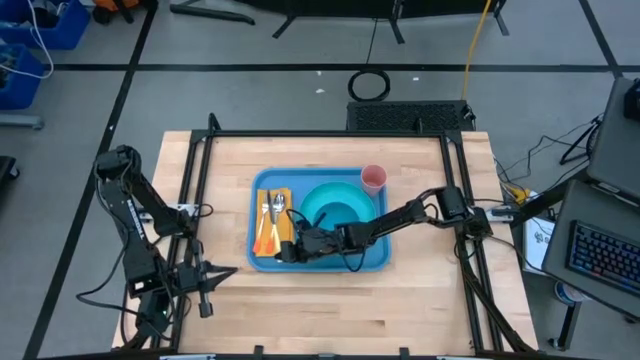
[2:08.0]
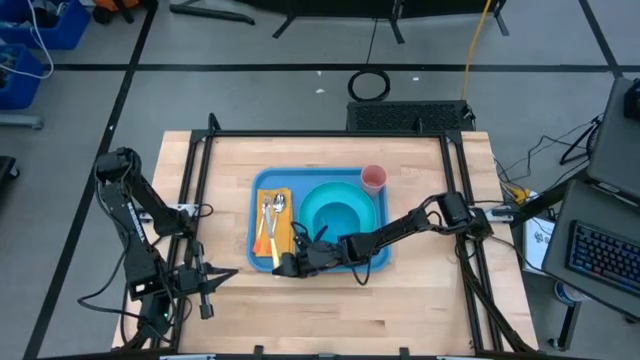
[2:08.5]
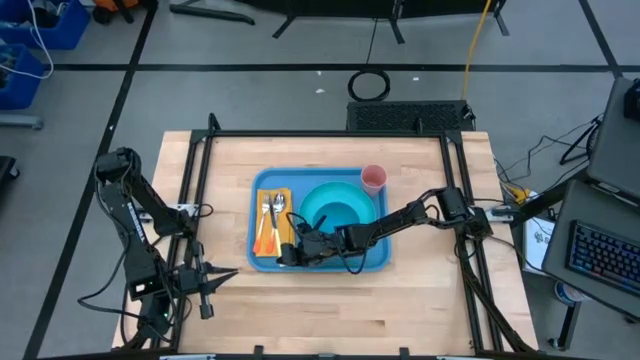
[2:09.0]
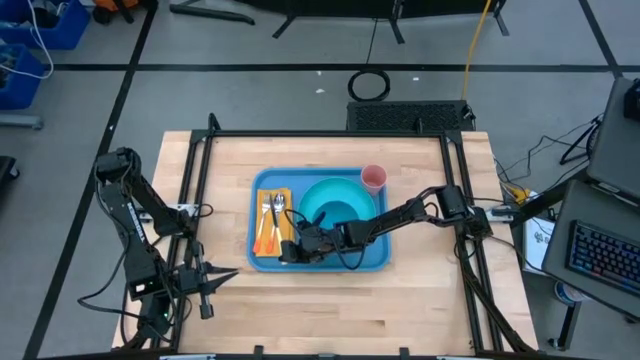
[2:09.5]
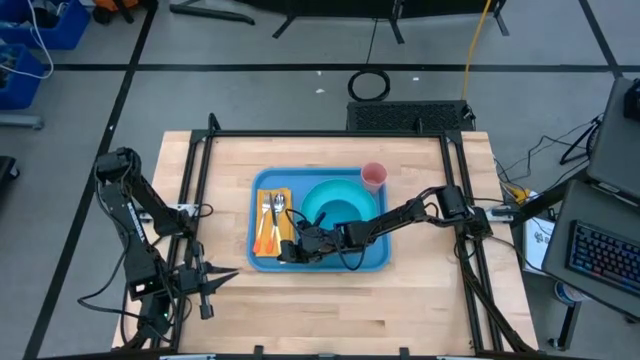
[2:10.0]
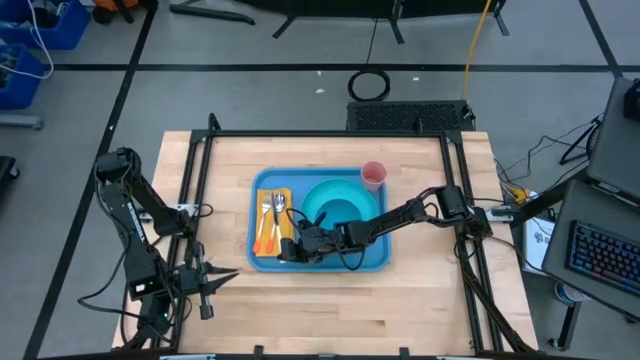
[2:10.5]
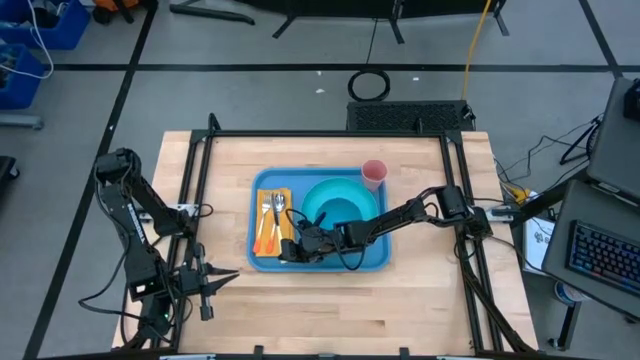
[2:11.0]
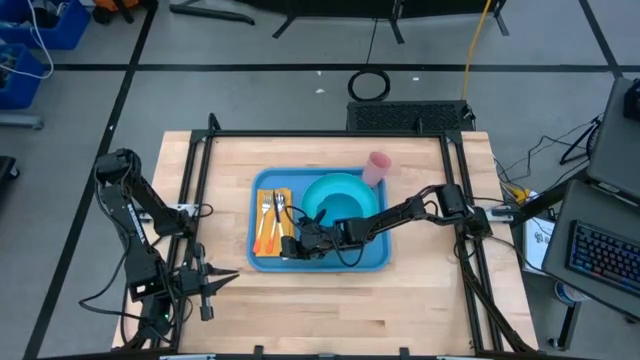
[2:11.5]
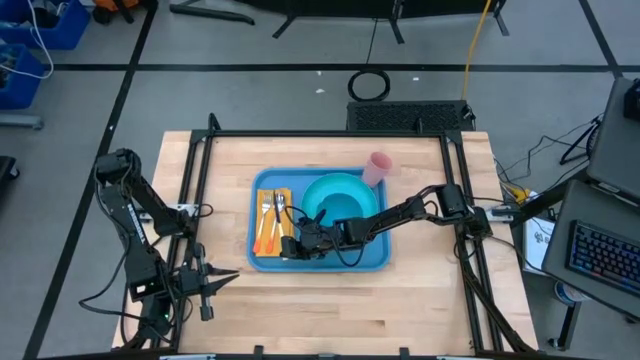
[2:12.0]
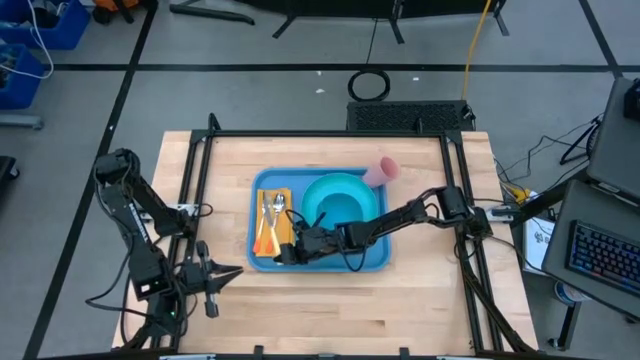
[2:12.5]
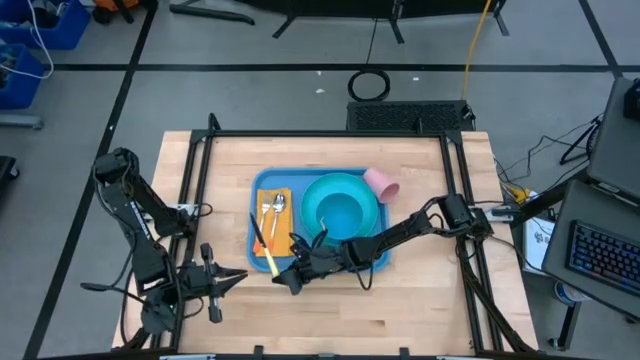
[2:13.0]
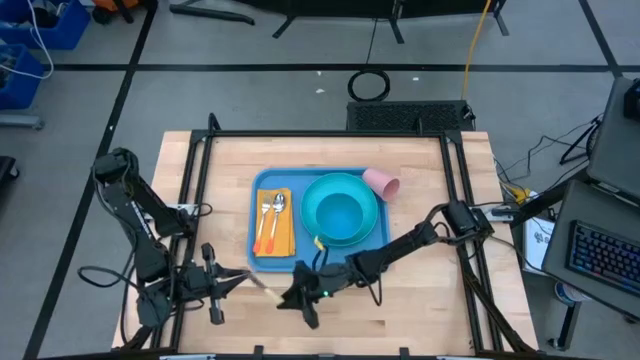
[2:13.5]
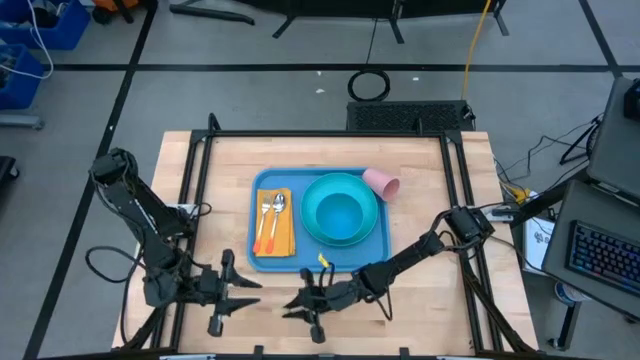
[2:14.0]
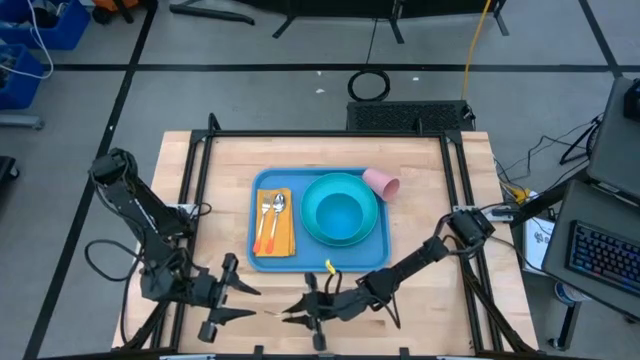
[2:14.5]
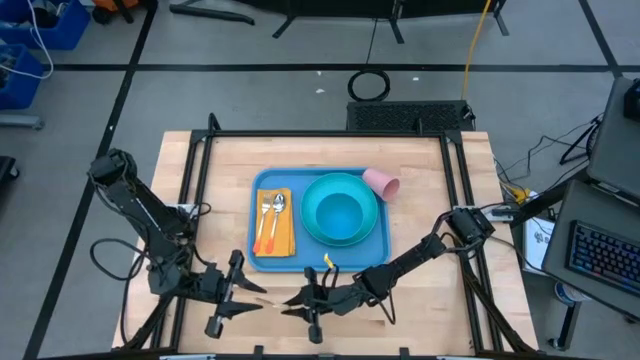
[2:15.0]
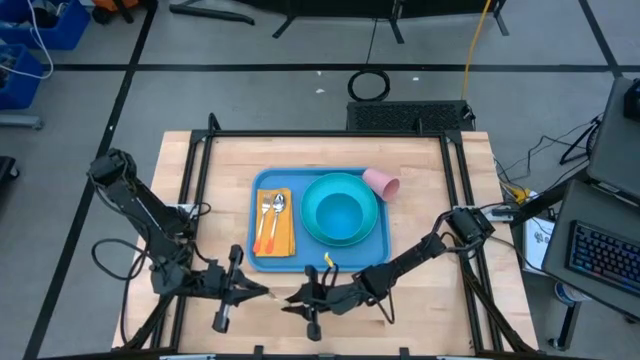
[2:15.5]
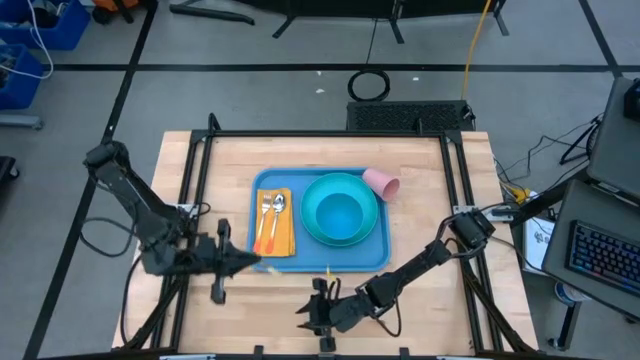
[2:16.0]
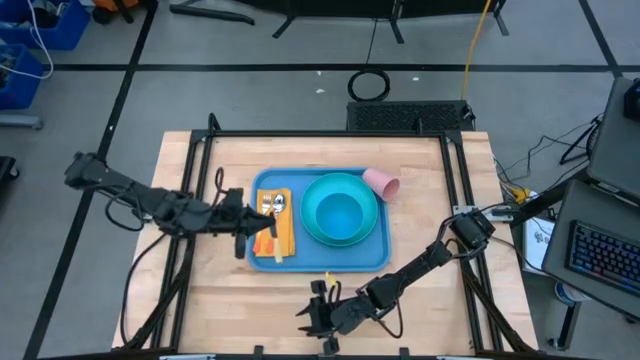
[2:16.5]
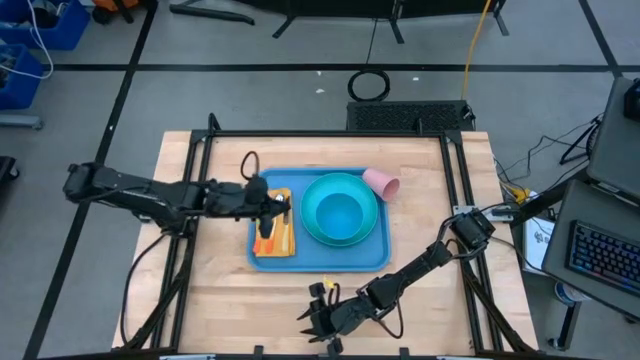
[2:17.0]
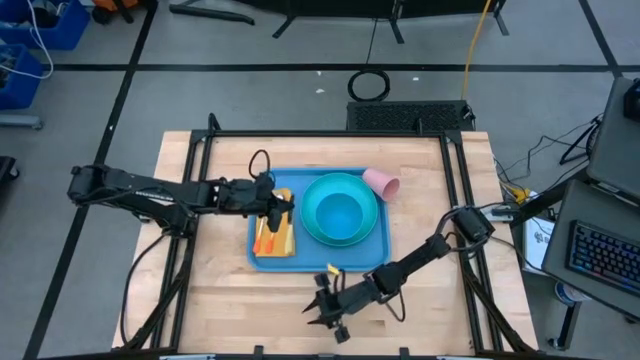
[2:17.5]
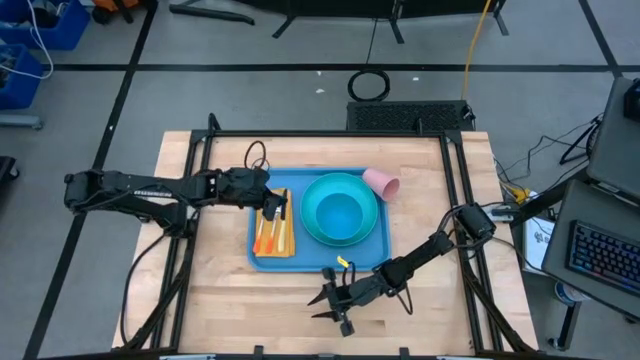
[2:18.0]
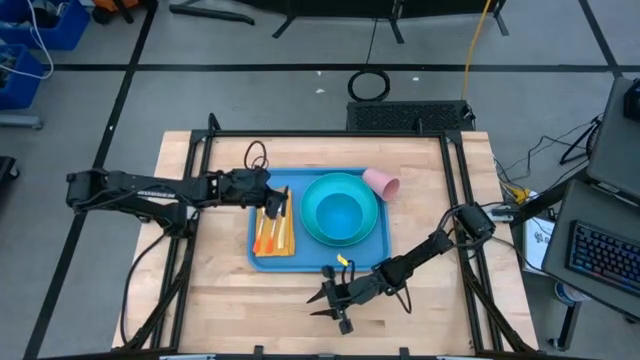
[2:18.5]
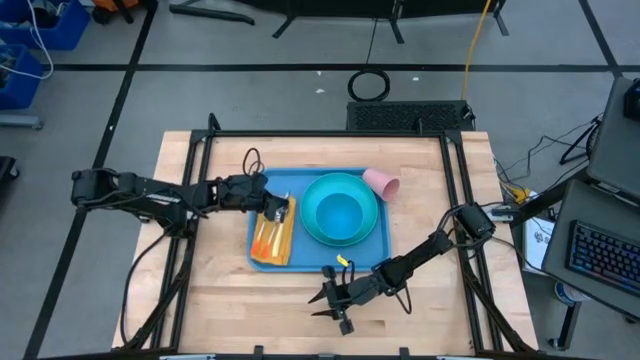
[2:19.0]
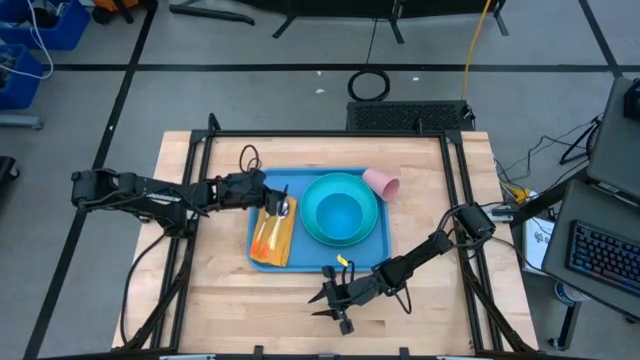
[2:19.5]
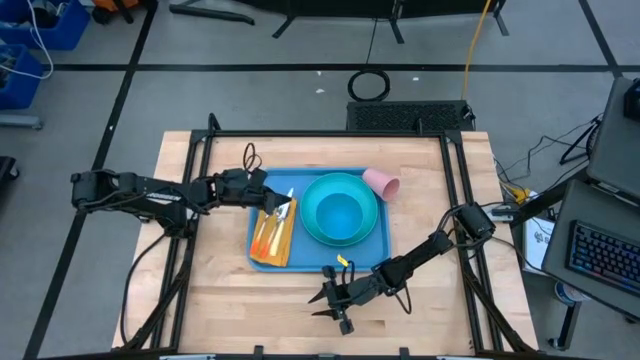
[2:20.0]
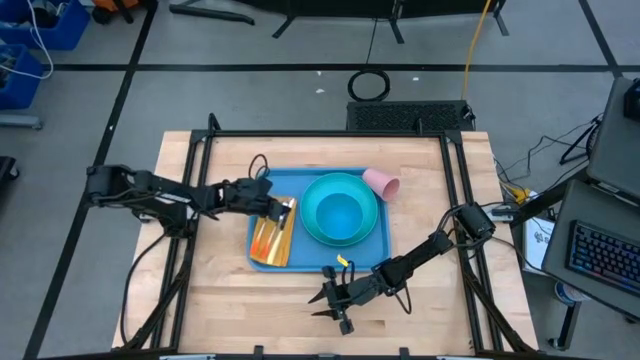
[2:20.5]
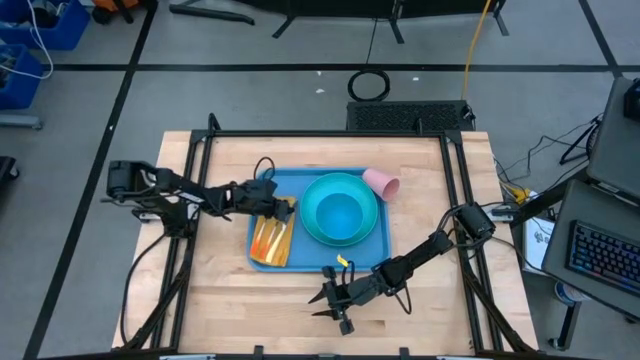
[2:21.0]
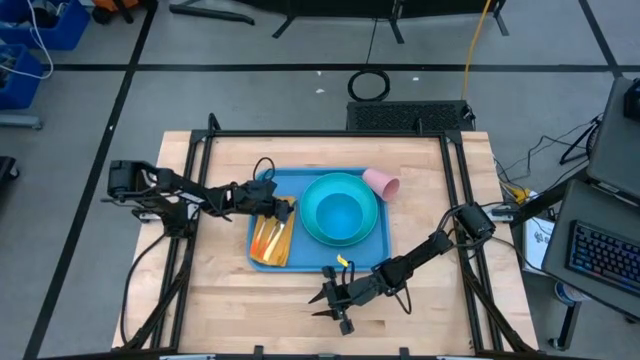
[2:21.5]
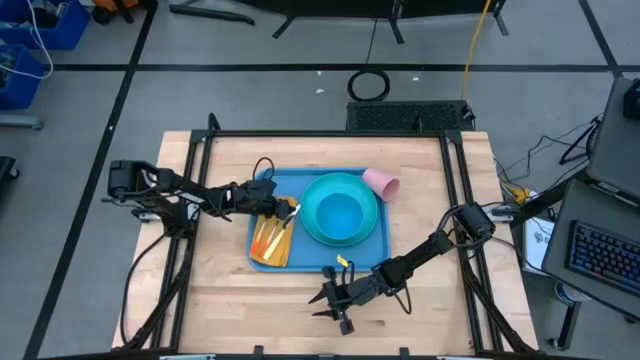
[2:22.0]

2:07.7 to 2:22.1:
Task: Set up tray
Put the yellow knife on the yellow table napkin

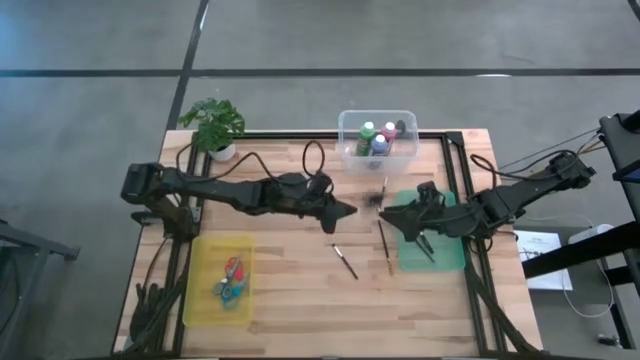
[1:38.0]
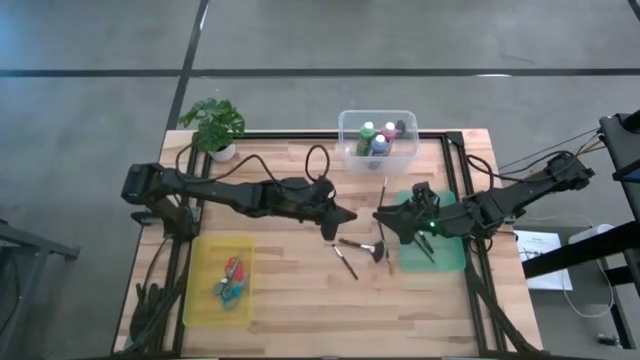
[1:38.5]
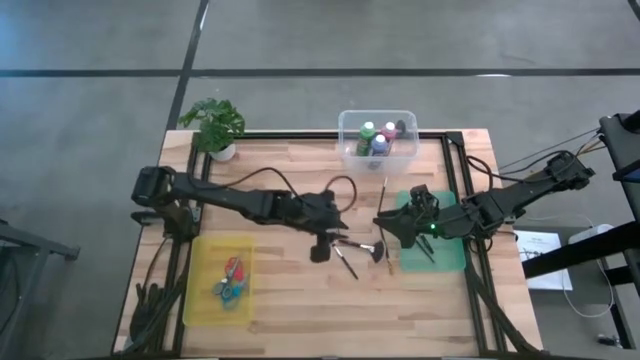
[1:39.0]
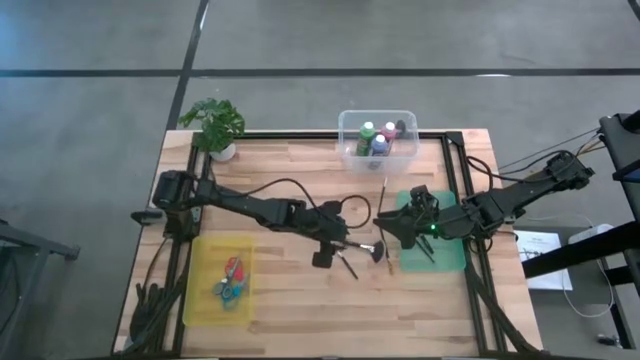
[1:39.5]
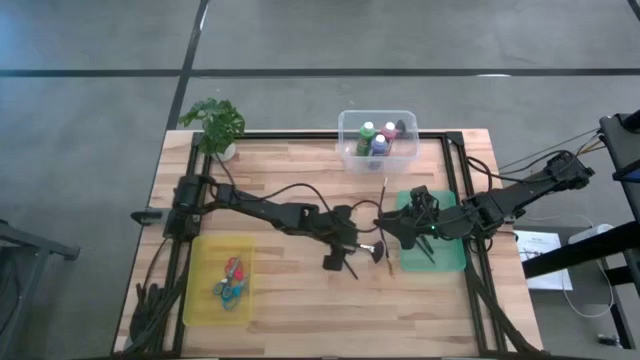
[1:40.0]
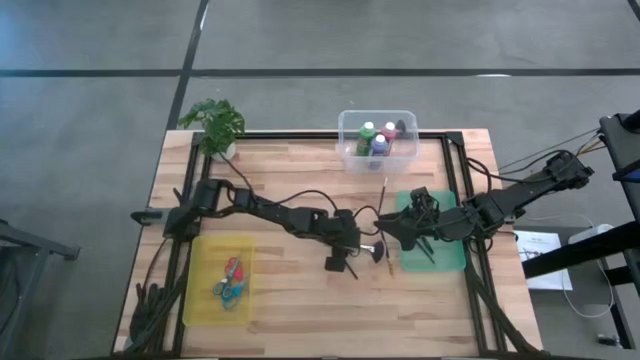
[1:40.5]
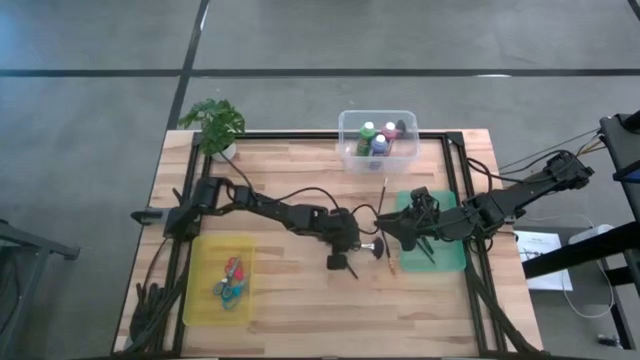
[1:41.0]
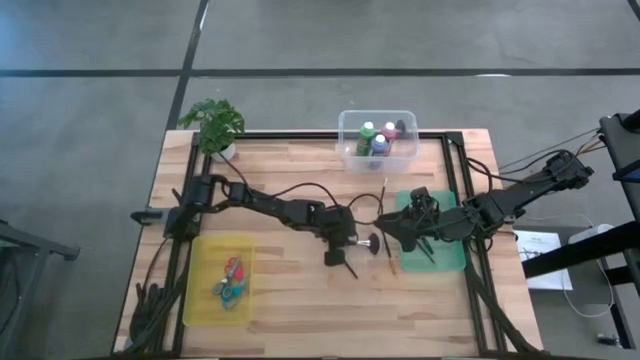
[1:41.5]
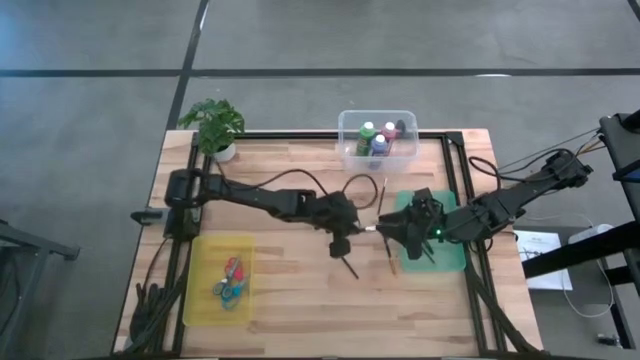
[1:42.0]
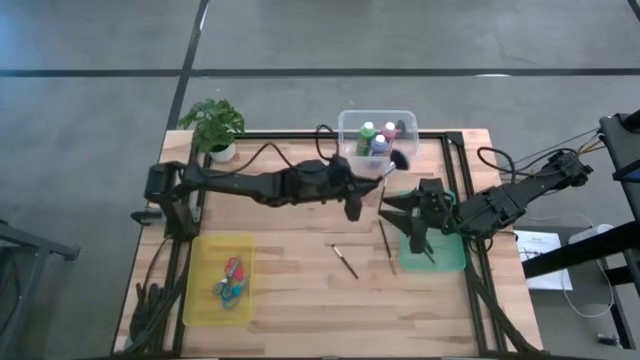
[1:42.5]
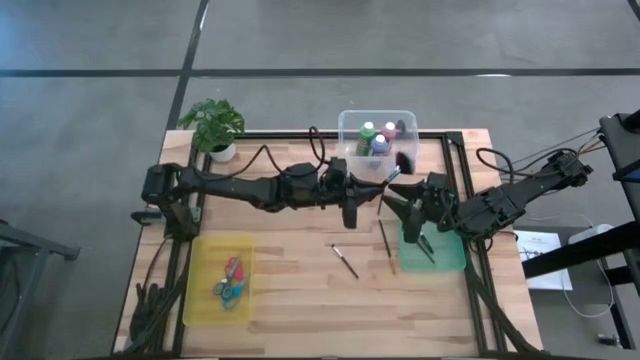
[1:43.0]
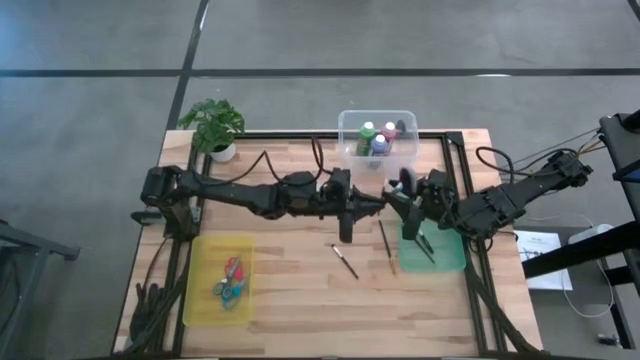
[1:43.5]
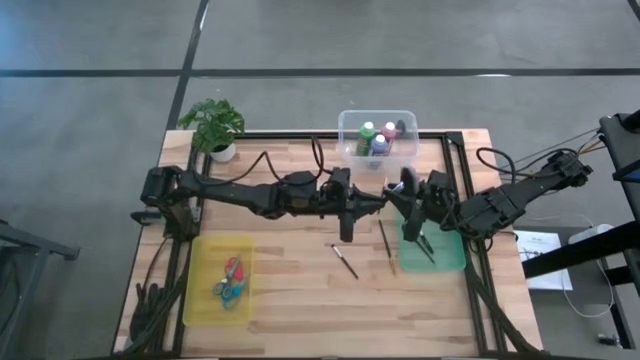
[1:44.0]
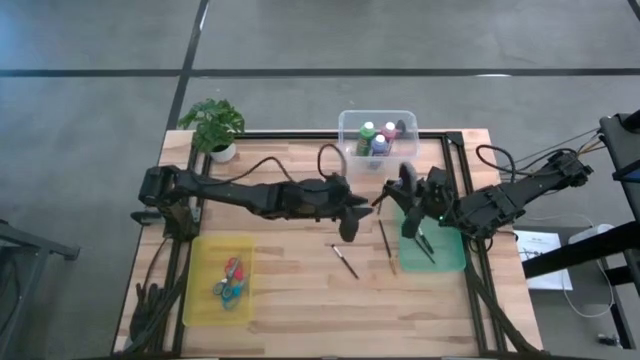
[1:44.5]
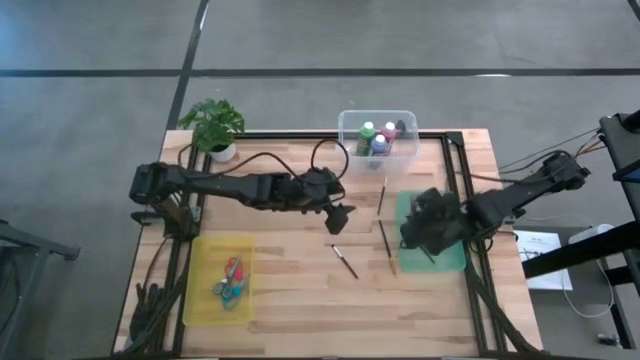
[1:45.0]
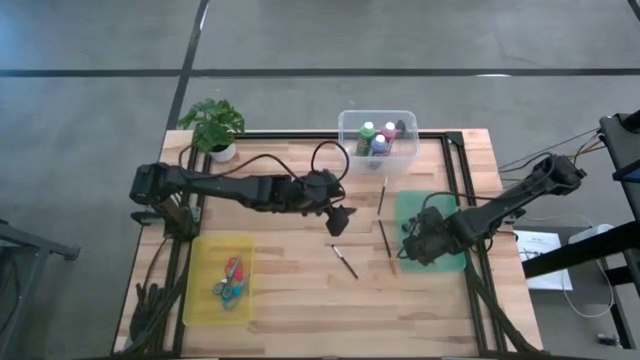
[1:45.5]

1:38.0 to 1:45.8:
Task: Pick & Place Paint Supplies
Put the black highlighter brush into the green bin
